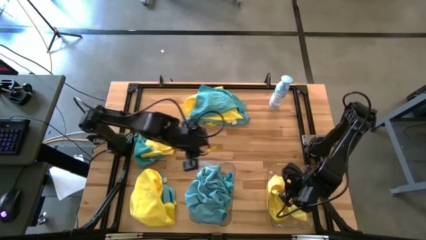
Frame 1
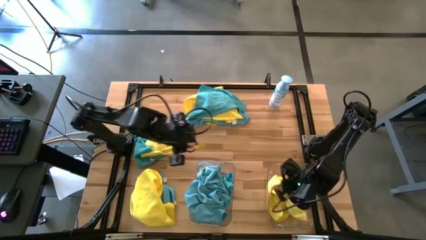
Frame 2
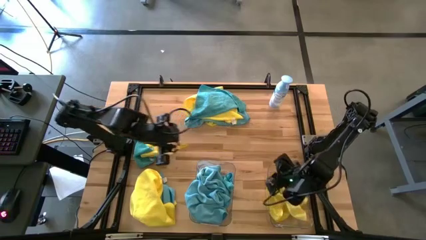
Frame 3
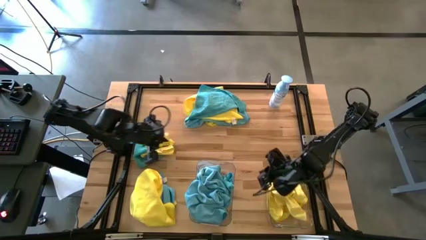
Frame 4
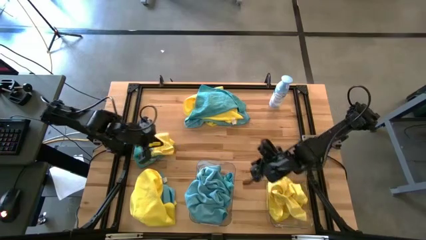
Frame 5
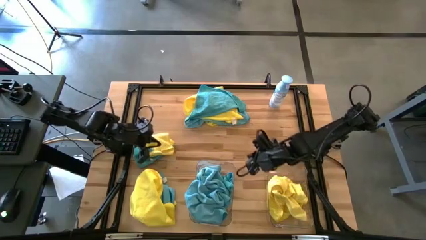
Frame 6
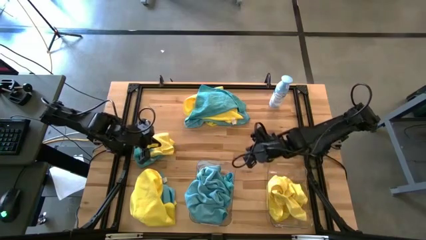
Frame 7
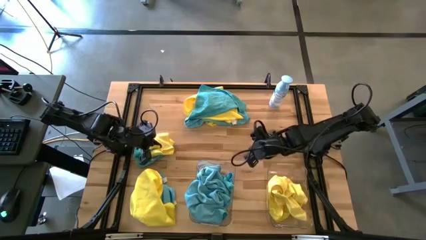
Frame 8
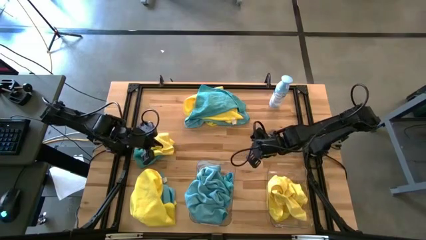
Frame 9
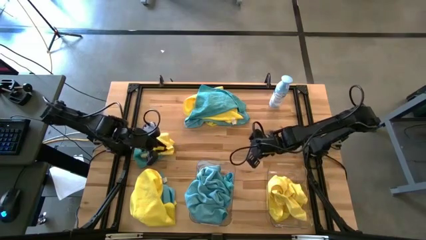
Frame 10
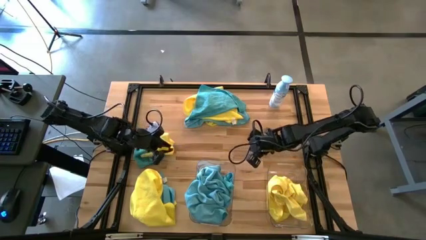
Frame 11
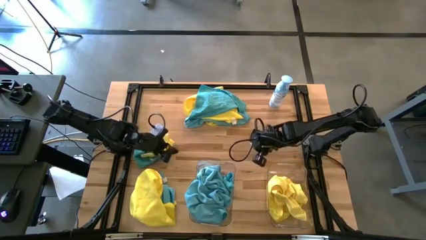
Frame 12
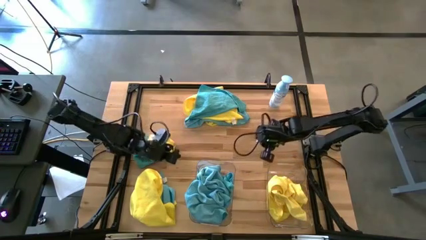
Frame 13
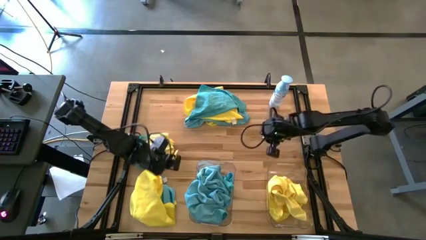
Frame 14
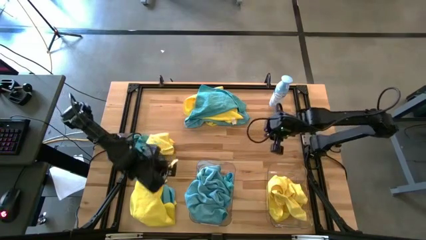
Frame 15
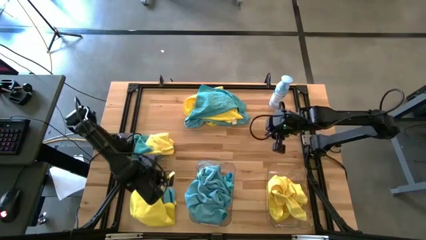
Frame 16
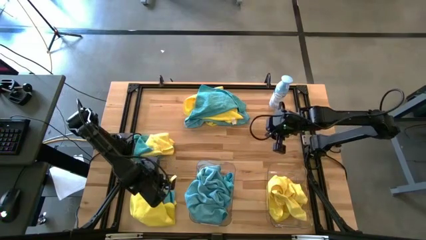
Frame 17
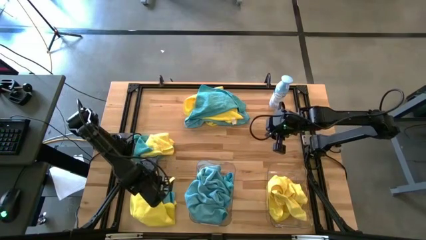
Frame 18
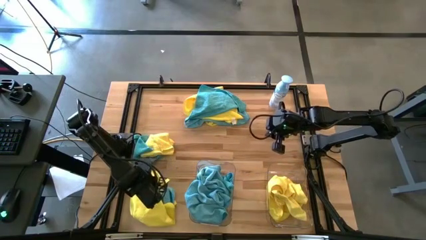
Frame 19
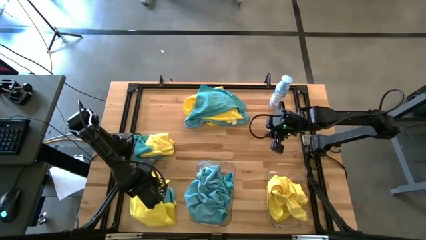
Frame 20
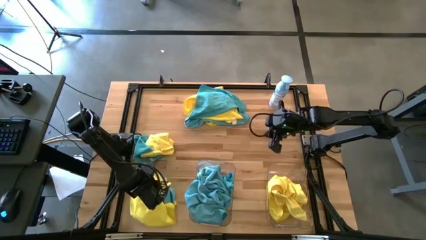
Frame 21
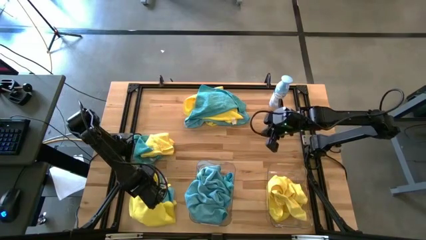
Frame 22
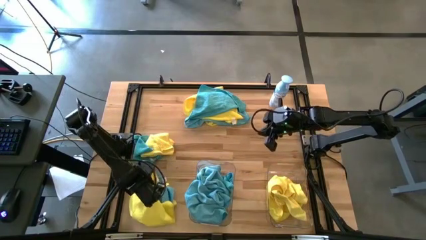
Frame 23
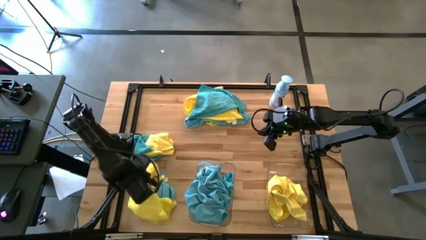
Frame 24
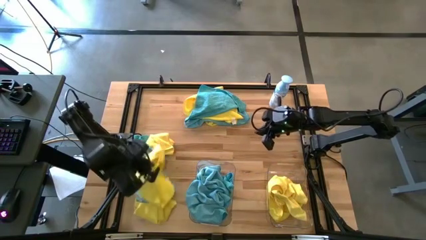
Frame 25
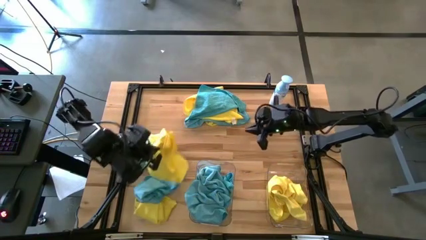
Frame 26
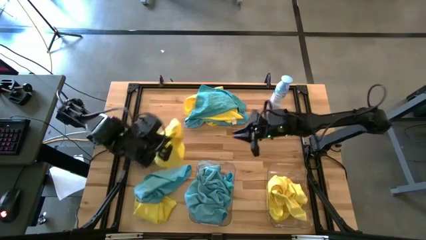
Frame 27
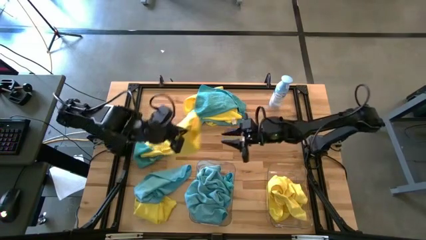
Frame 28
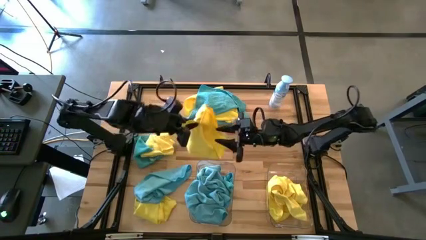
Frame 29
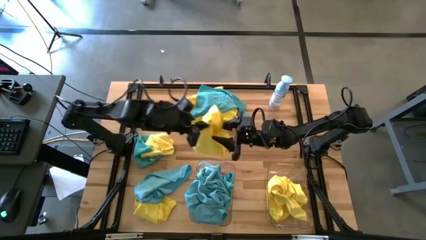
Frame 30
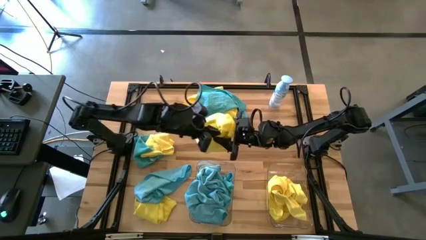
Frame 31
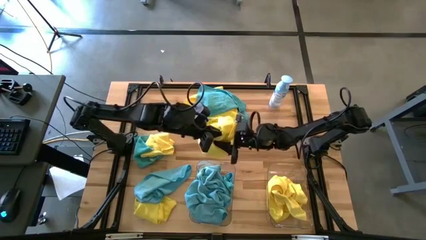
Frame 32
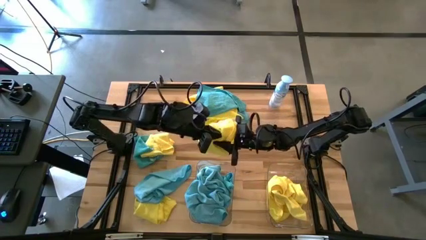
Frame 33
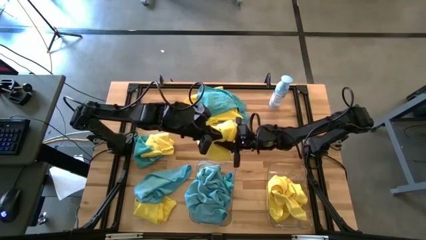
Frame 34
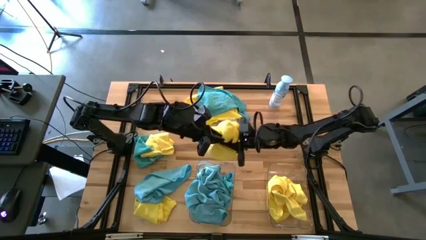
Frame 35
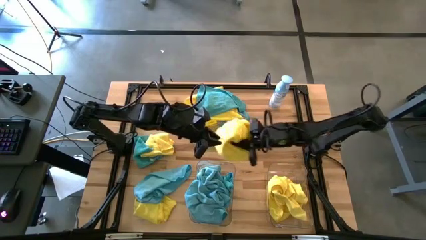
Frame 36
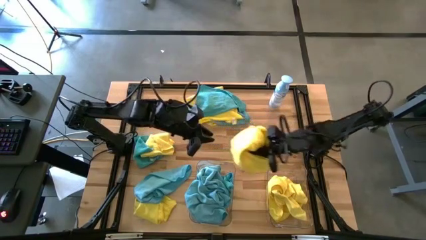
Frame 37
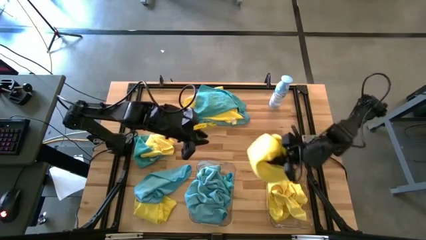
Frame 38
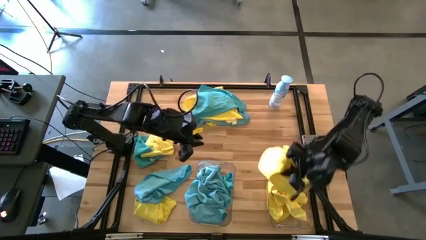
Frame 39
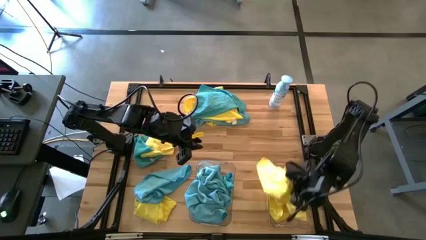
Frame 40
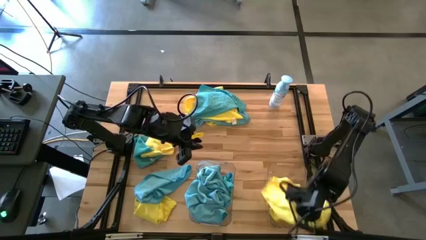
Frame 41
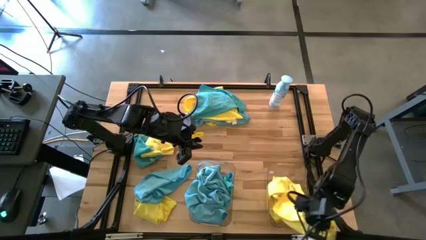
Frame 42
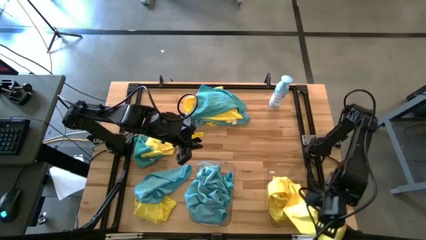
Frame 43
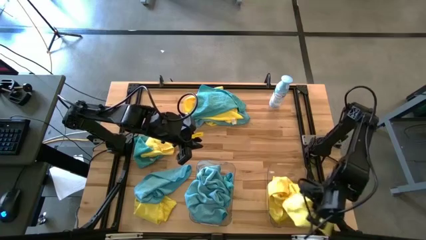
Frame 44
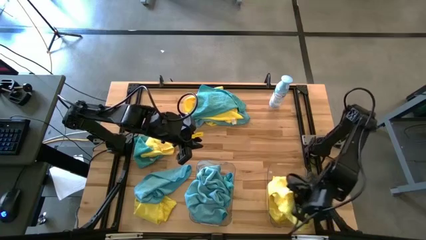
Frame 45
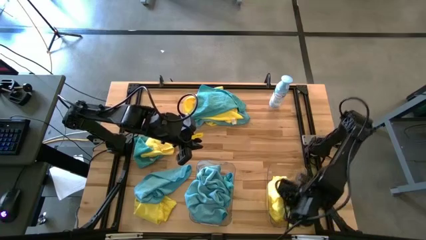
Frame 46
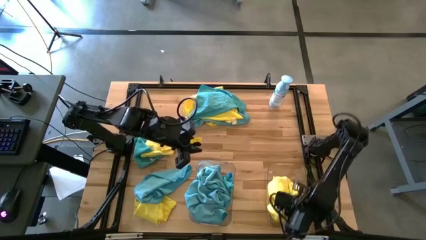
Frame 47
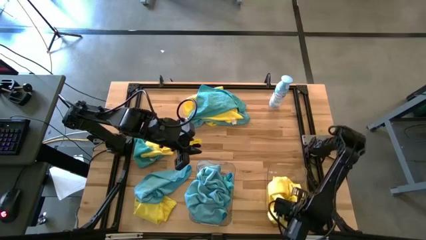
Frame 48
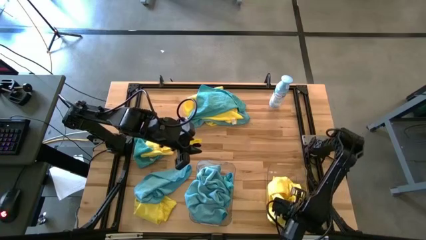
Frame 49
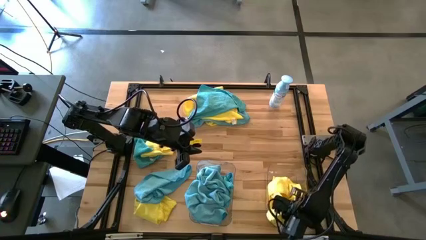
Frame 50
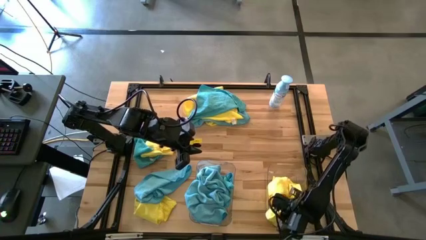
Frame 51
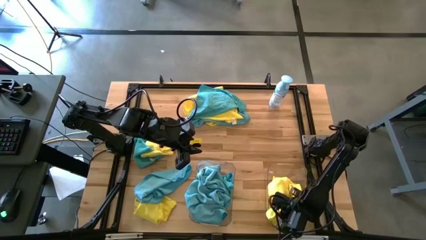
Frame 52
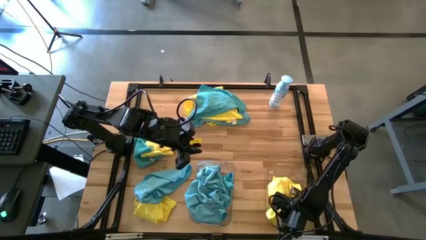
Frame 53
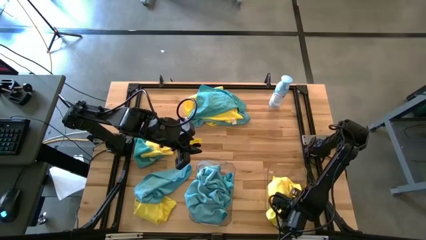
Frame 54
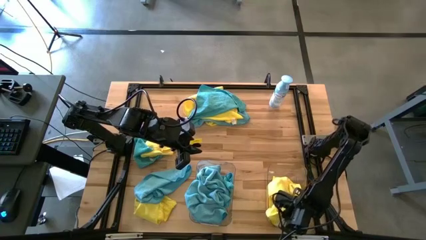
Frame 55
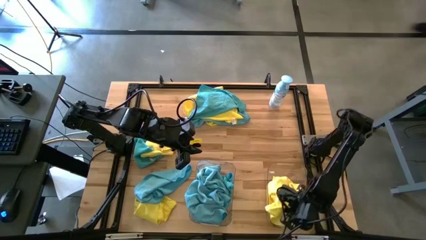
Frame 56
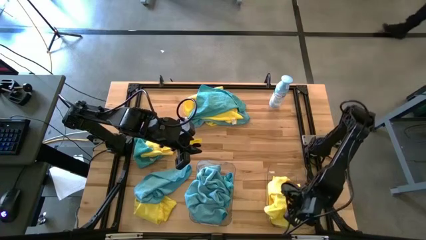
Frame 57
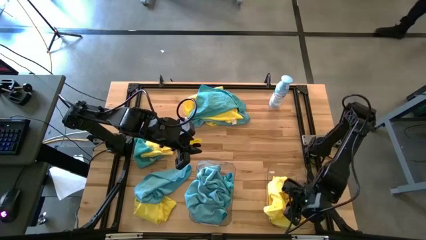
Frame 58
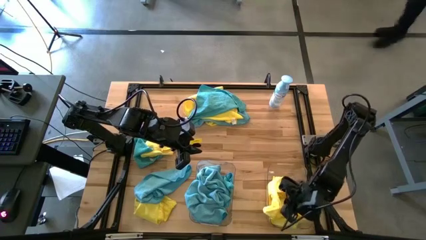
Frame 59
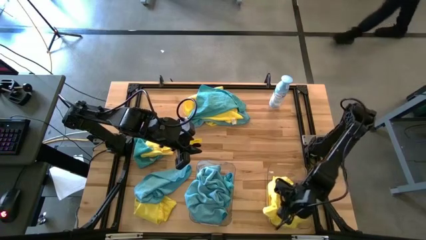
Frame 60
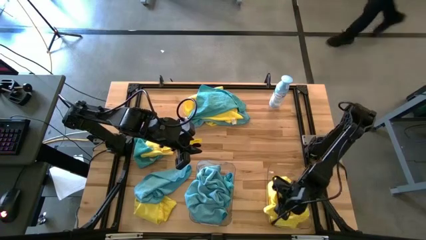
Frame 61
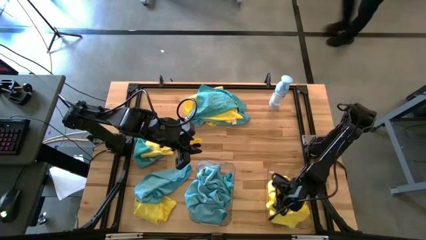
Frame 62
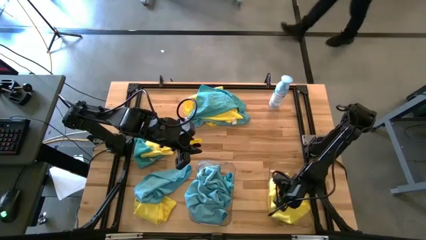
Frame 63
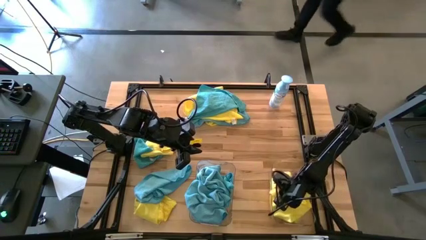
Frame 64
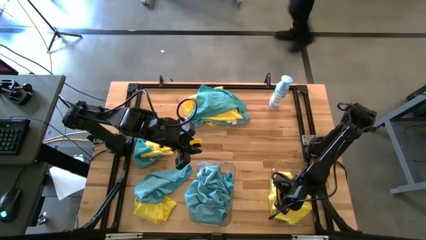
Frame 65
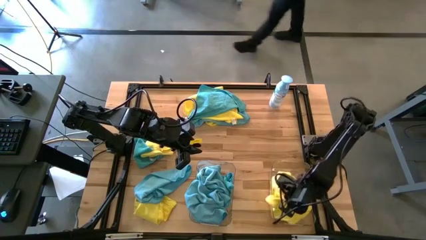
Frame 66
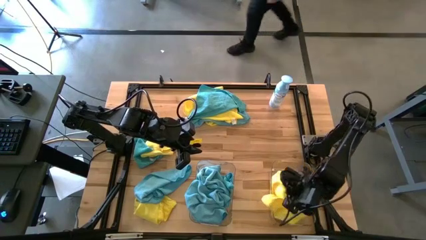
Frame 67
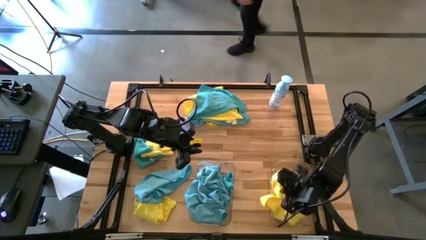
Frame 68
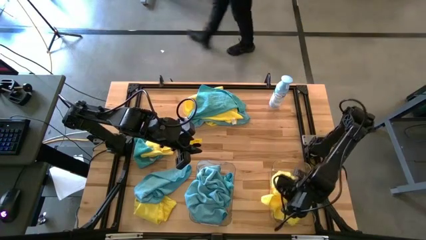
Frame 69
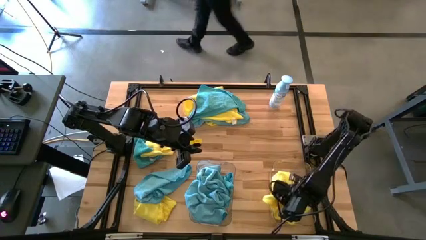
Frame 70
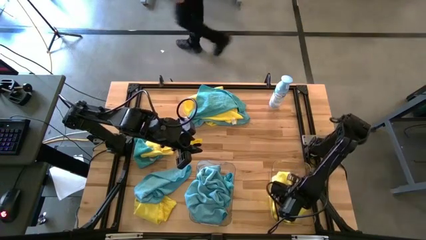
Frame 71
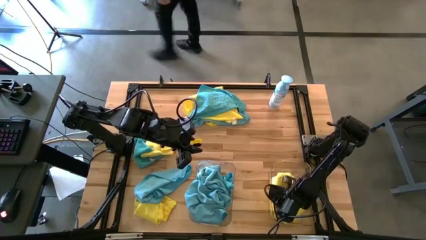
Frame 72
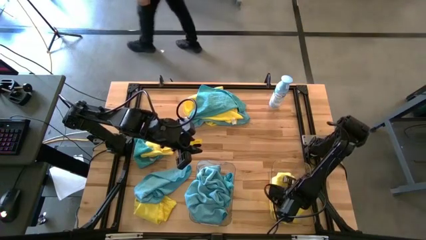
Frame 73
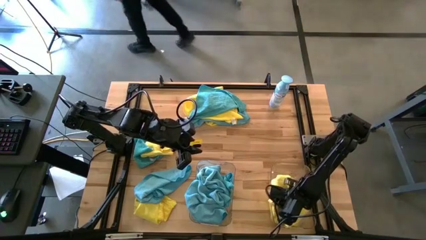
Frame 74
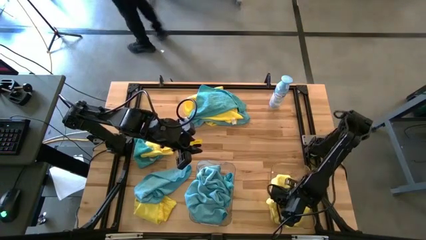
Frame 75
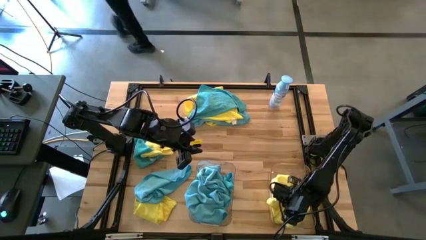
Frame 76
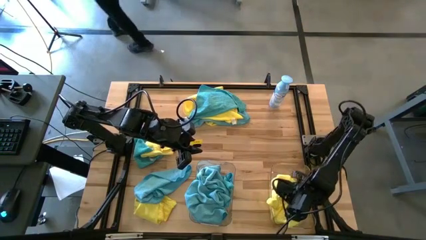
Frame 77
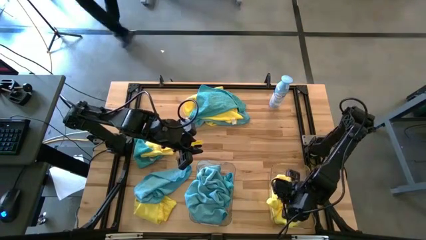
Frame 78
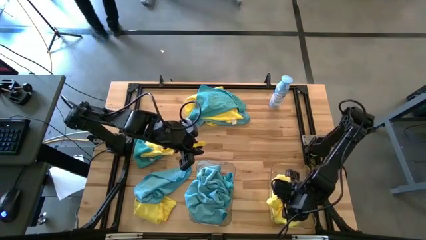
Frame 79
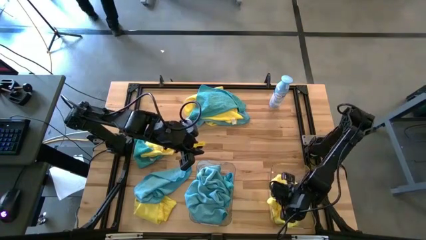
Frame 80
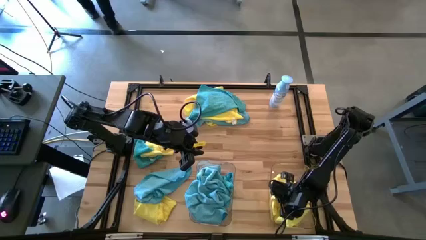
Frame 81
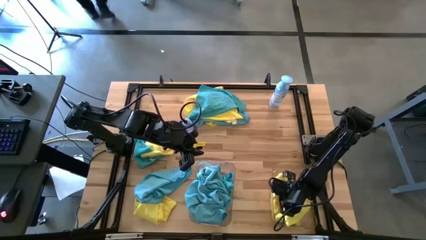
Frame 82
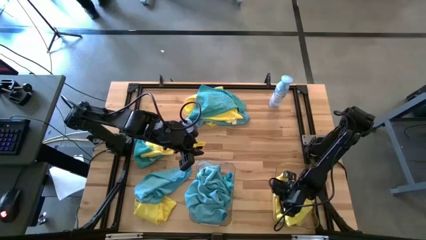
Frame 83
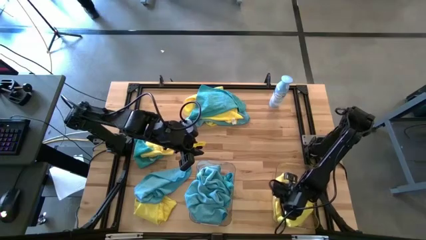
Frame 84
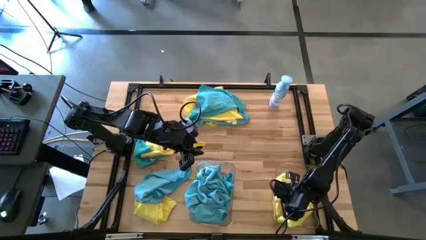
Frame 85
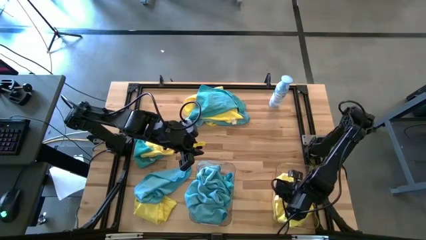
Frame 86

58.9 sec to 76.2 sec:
Task: Sort microfiber towel by color & place in baskets
Put the yellow towel into the right transparent bin
